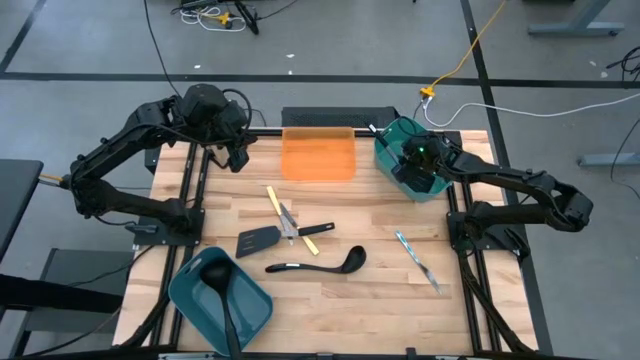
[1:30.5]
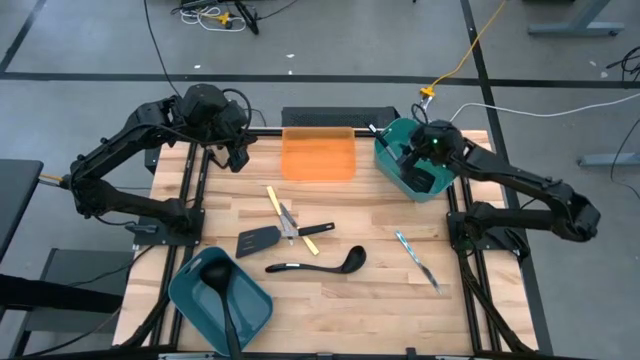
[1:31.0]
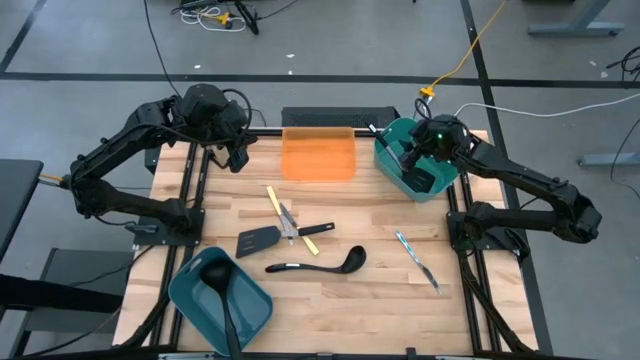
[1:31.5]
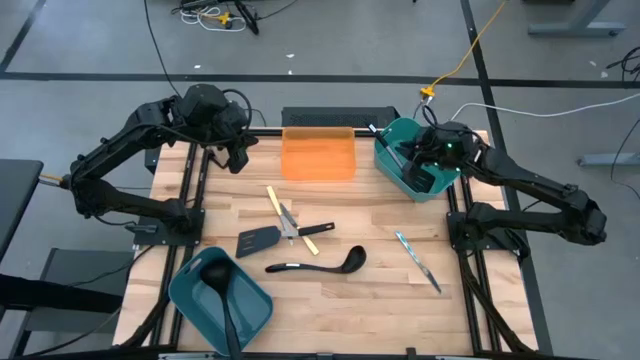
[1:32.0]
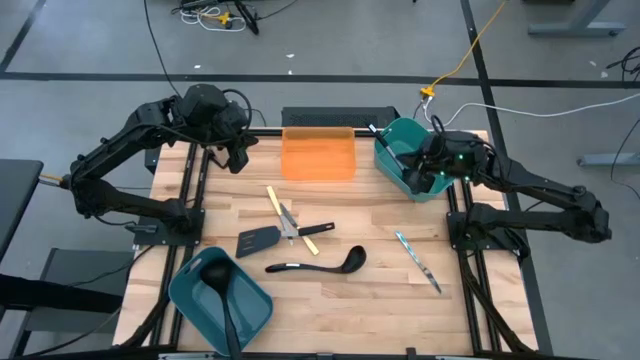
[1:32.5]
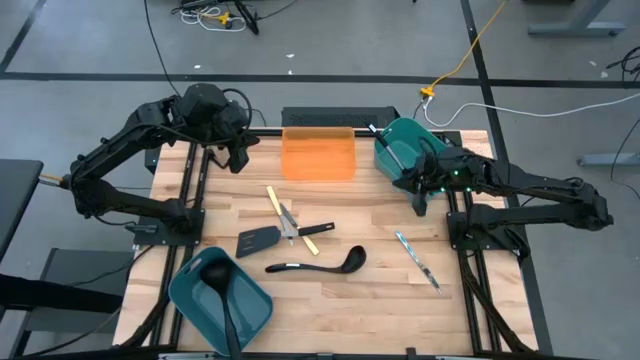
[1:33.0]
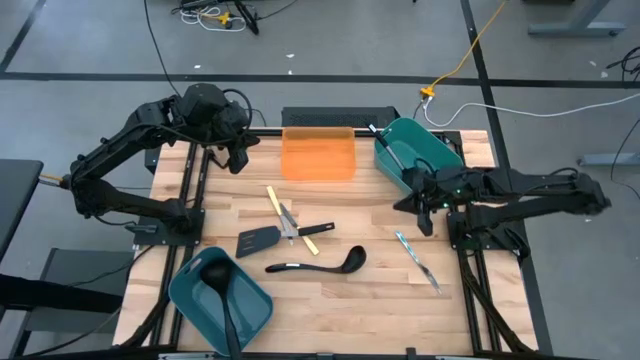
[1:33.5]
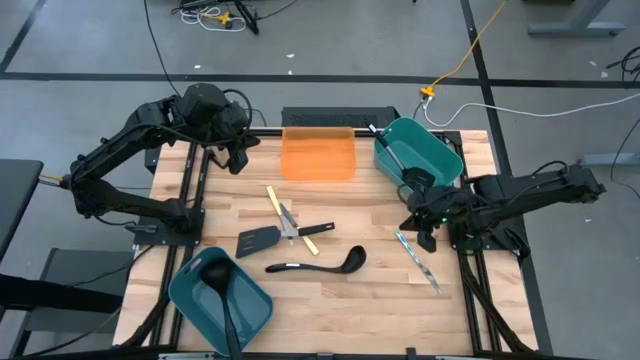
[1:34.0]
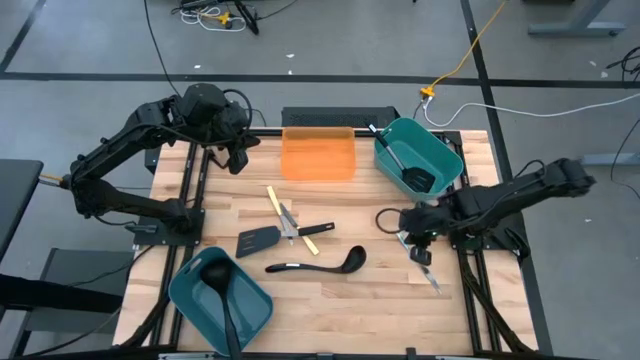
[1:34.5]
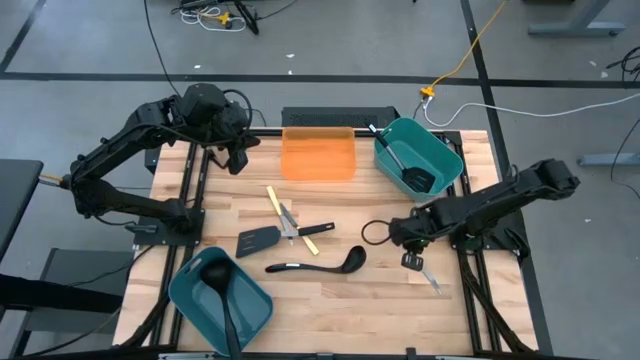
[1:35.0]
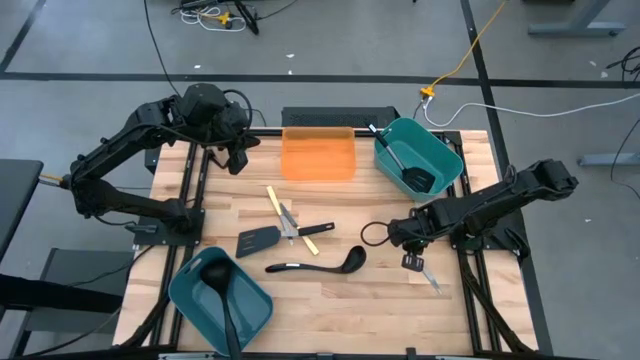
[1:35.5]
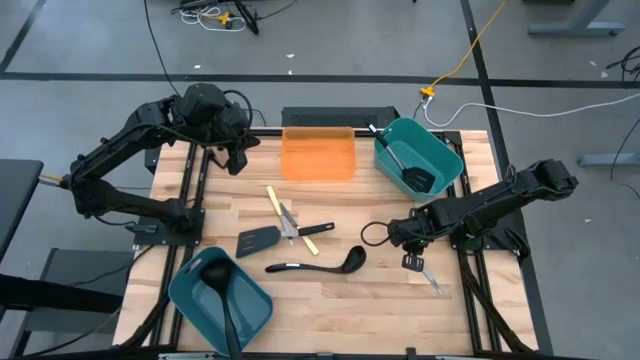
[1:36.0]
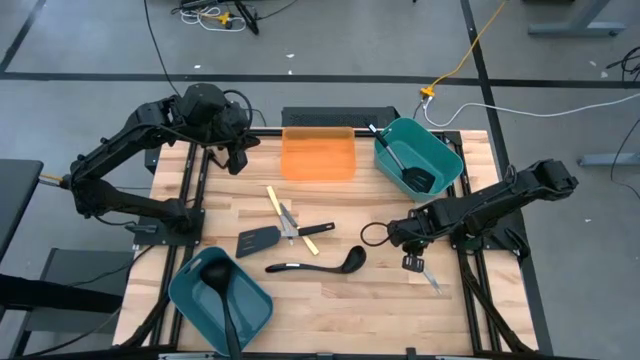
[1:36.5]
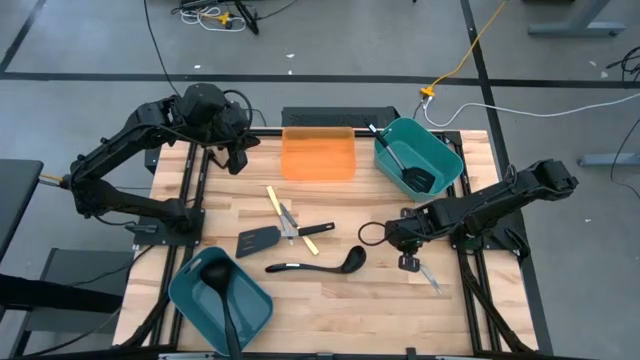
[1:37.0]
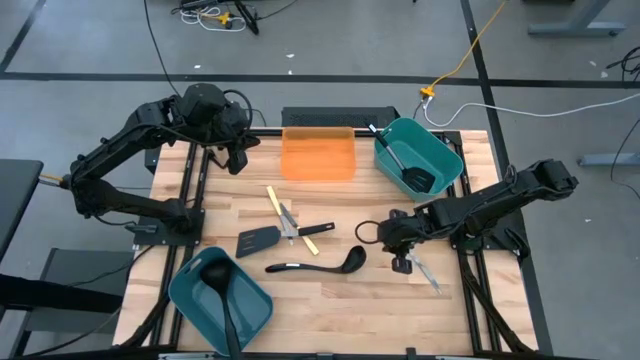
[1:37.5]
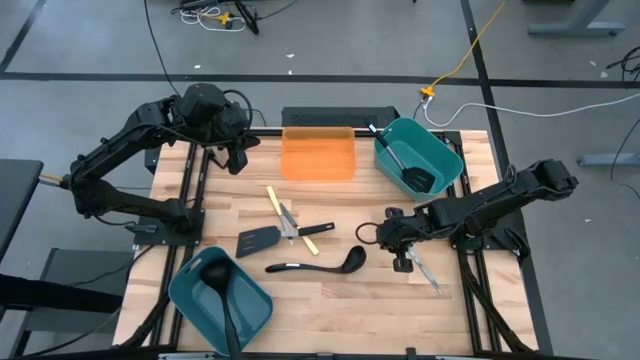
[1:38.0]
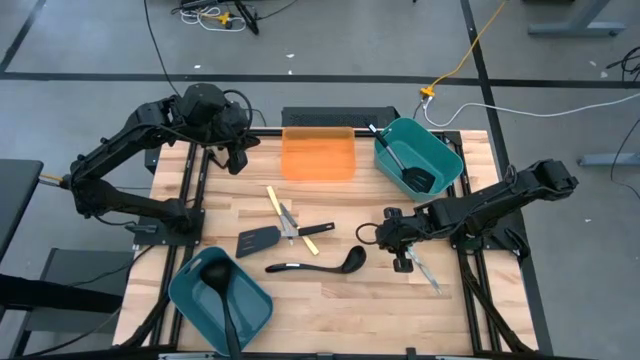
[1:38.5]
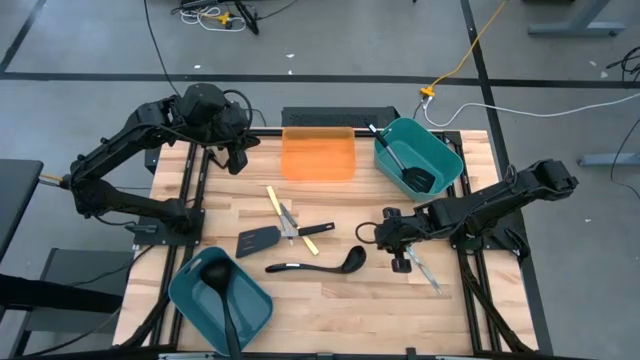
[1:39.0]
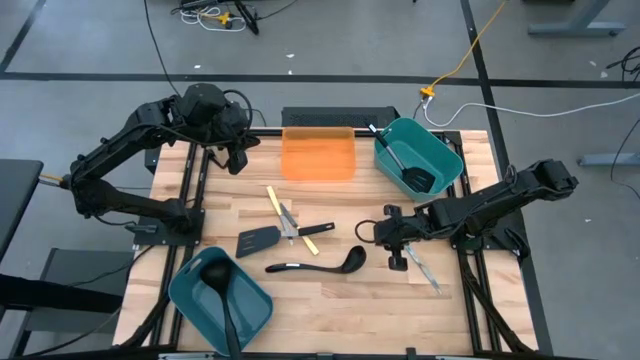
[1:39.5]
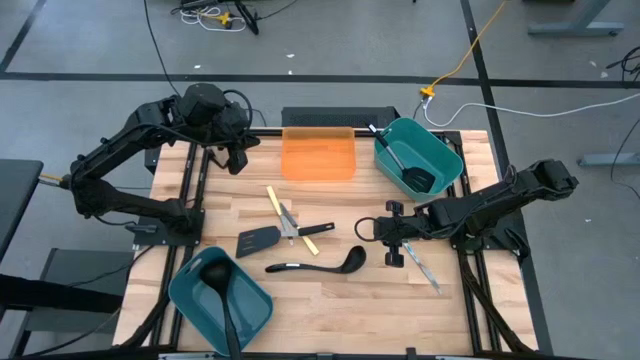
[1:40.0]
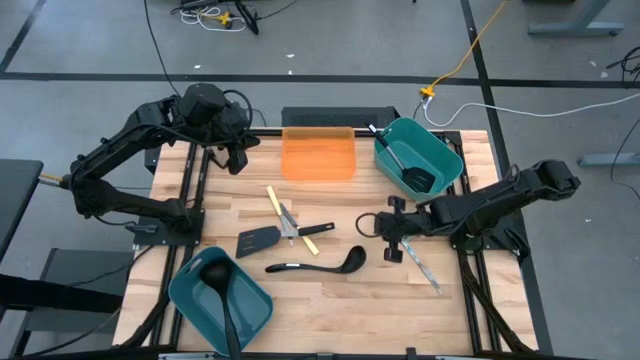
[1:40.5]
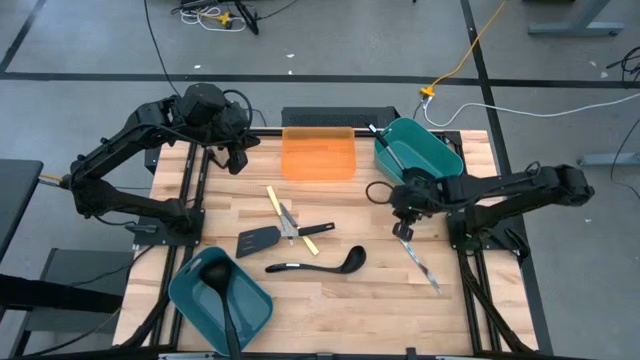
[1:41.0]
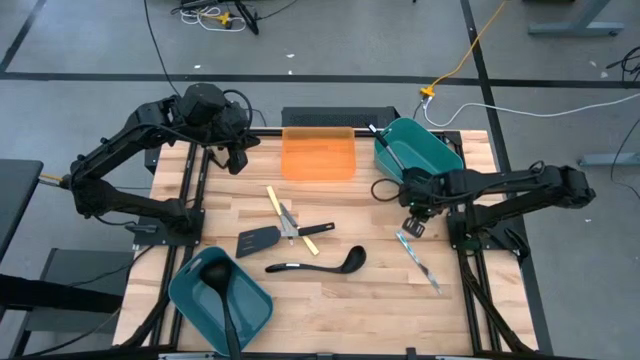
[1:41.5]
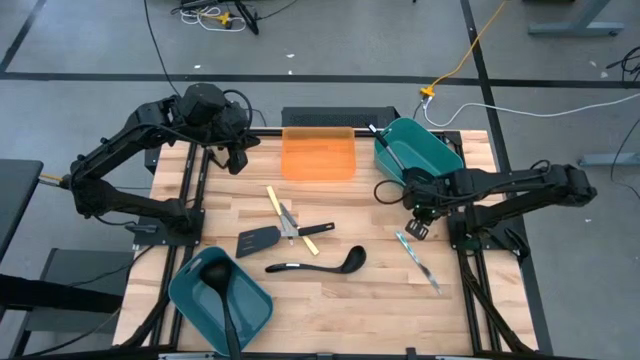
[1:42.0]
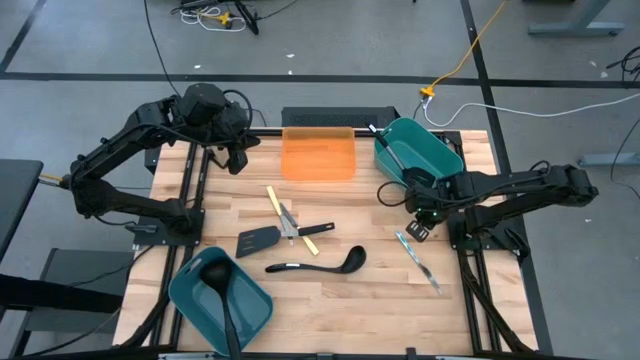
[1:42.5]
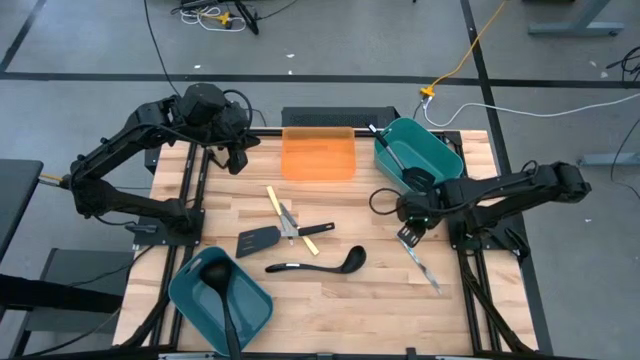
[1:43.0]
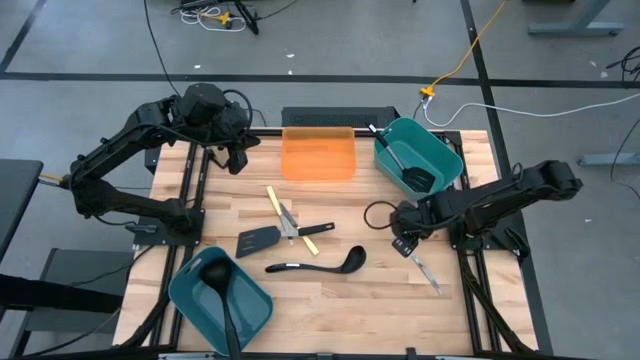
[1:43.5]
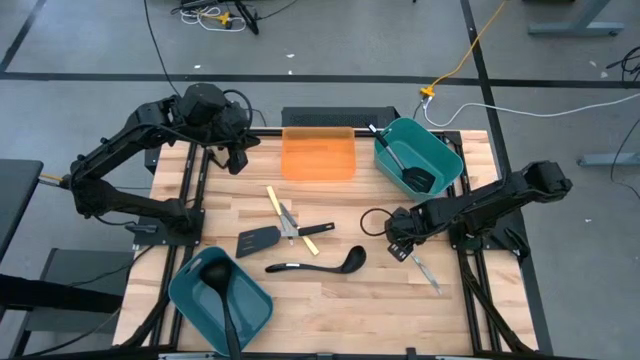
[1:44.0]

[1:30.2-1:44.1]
Task: Pick & Place Kitchen Items
Put the blue knife into the orange bin

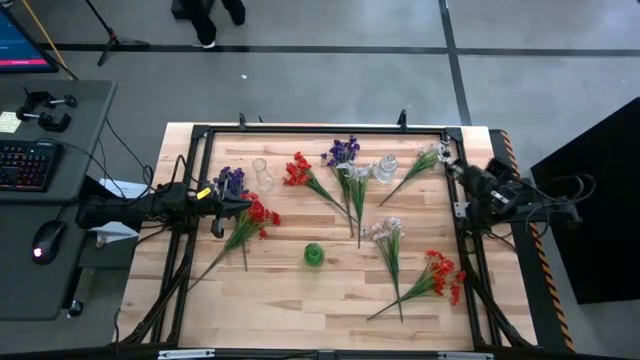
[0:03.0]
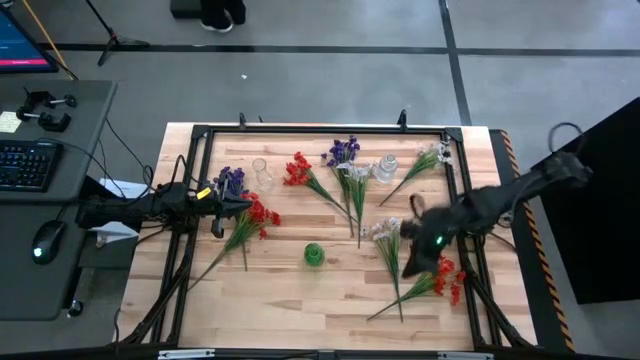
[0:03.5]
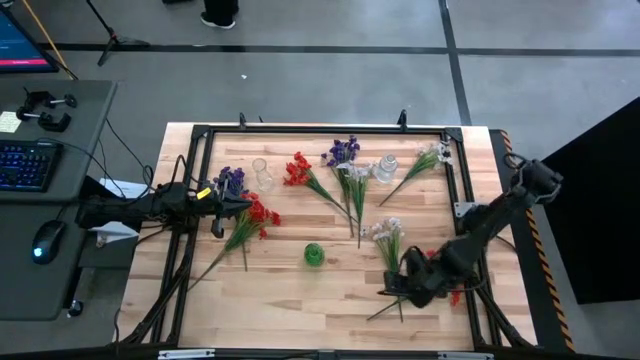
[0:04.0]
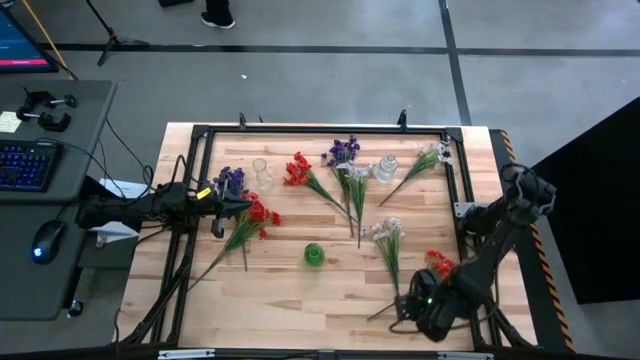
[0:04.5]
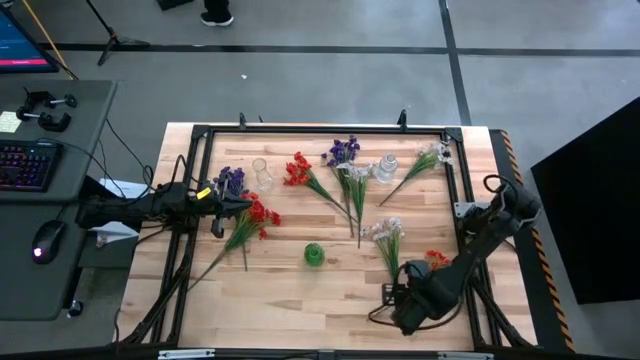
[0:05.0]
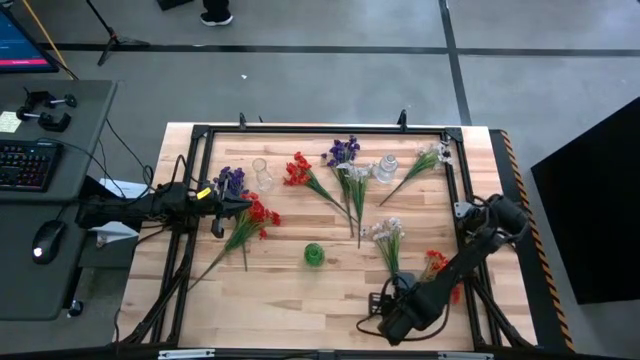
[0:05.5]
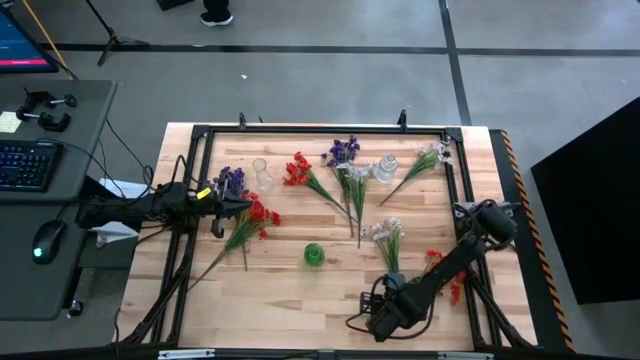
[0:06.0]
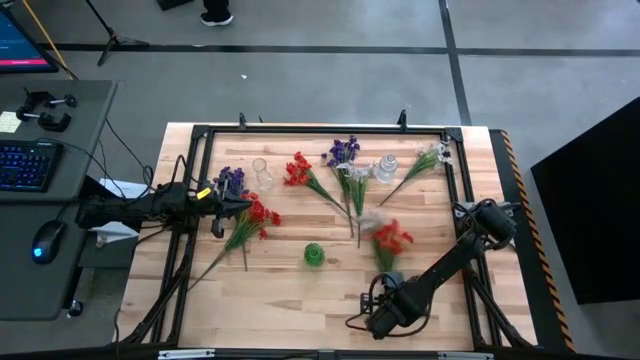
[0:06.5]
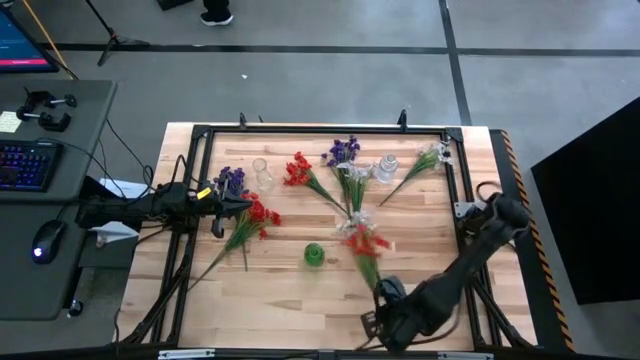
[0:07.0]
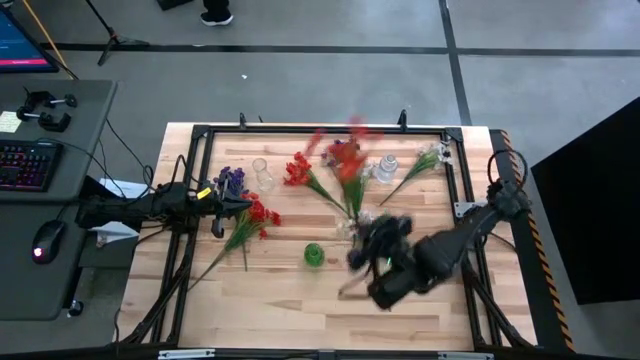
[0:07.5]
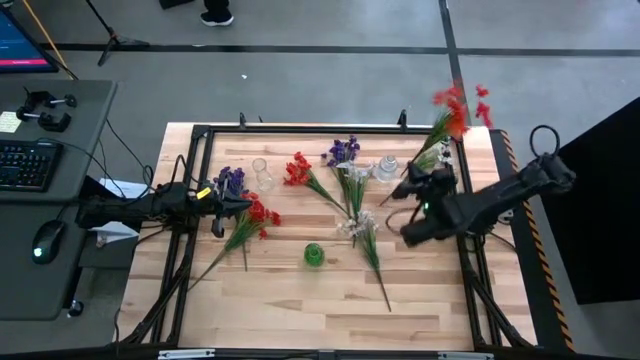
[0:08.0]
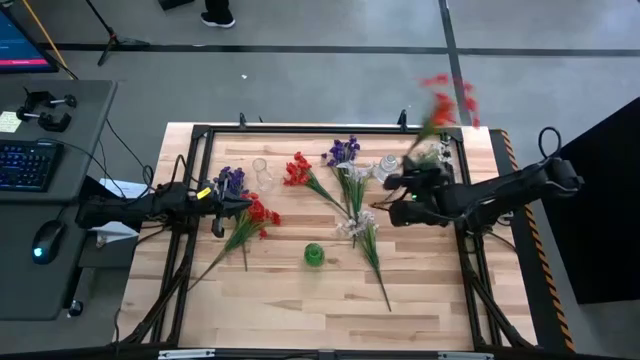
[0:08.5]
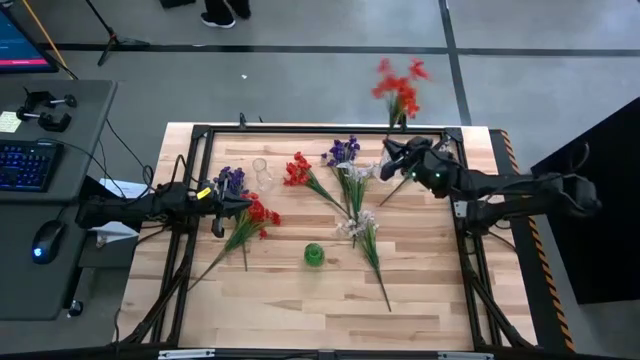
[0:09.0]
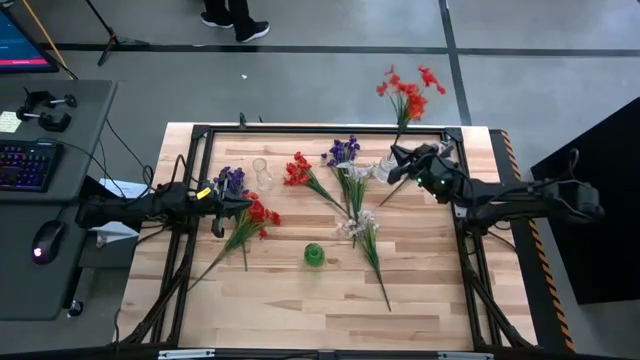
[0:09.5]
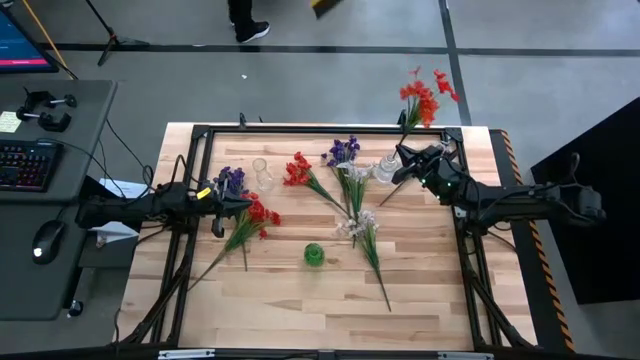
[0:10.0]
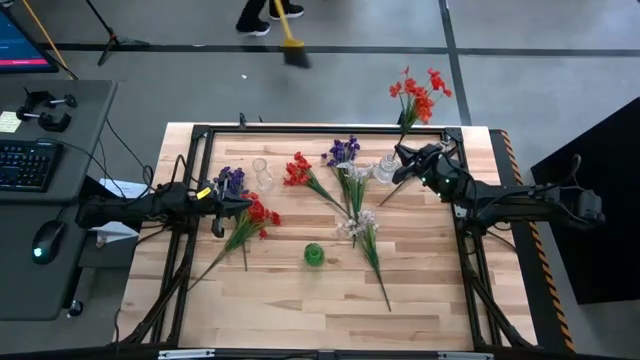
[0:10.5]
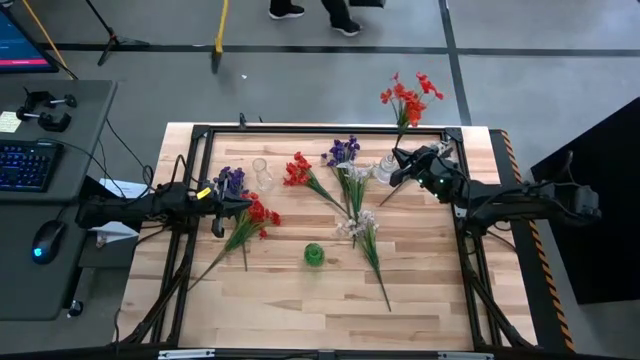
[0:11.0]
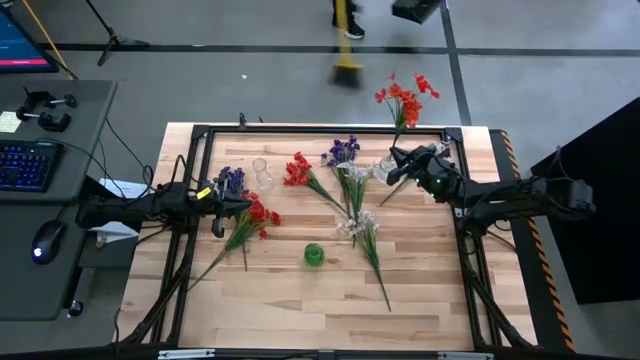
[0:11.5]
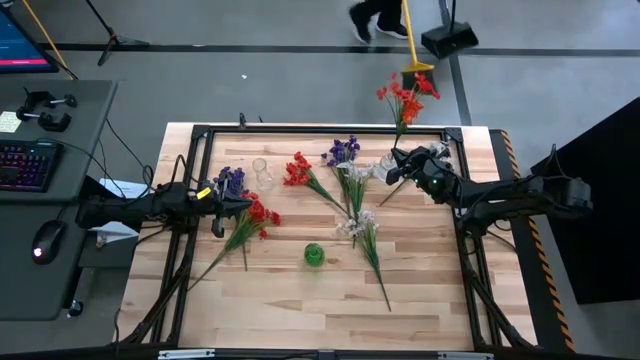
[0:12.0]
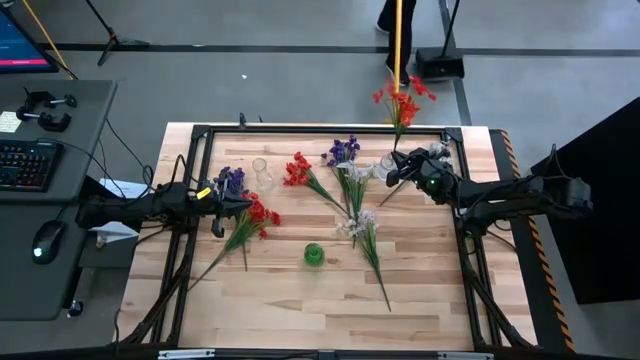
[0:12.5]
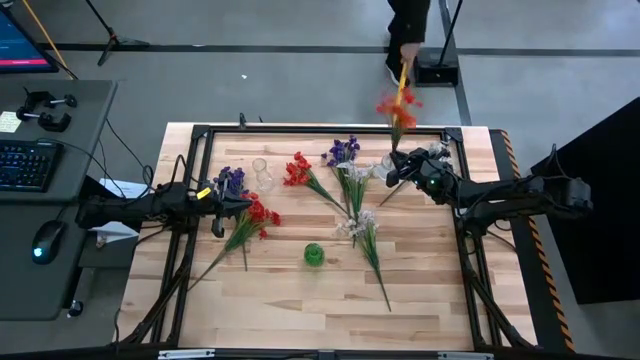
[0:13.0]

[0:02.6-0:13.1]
Task: Sort flowers into vase by color
Put the bottom right orange flowers into the top right transparent flower vase
